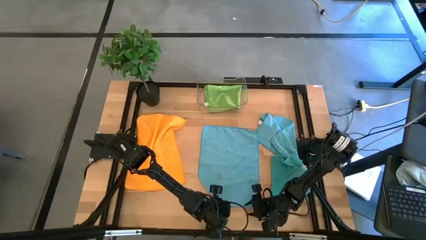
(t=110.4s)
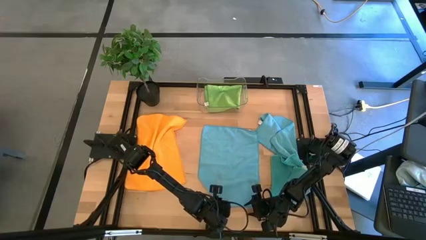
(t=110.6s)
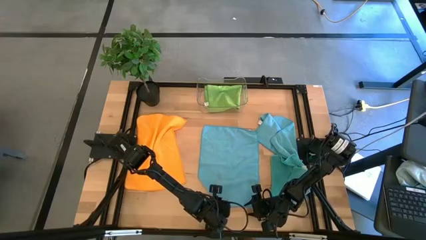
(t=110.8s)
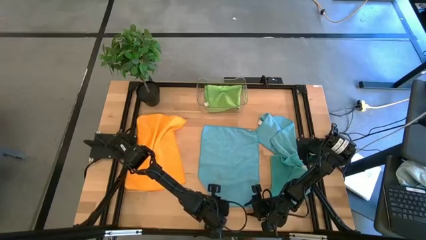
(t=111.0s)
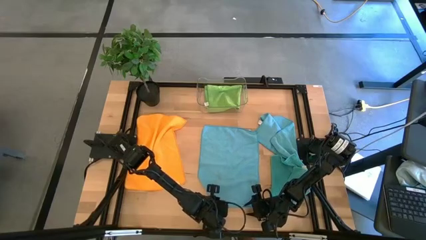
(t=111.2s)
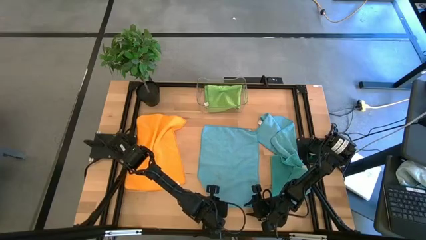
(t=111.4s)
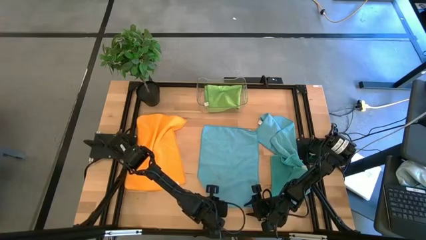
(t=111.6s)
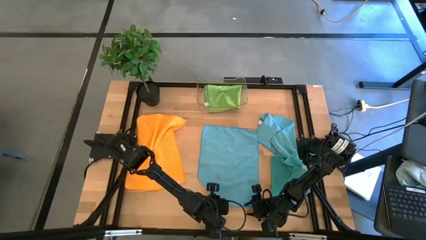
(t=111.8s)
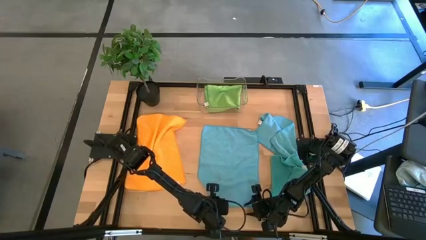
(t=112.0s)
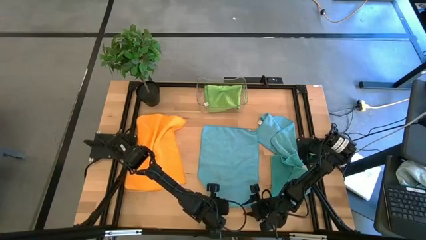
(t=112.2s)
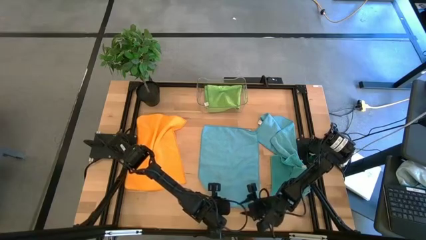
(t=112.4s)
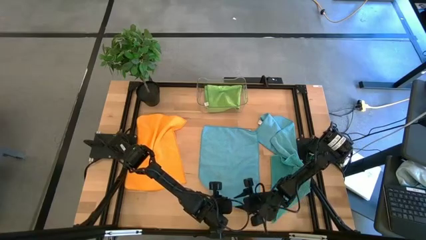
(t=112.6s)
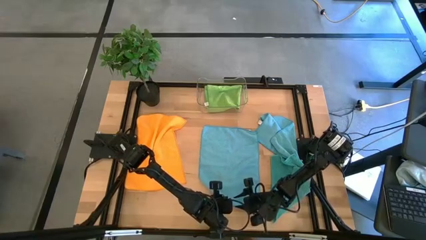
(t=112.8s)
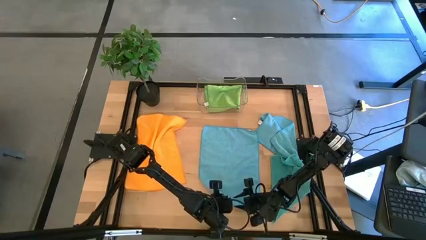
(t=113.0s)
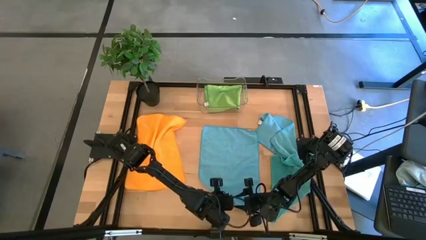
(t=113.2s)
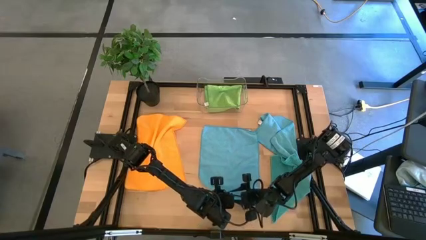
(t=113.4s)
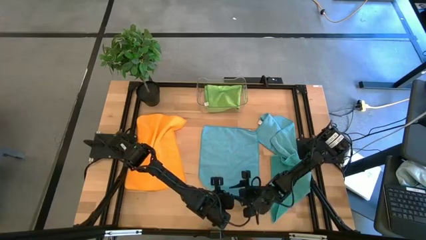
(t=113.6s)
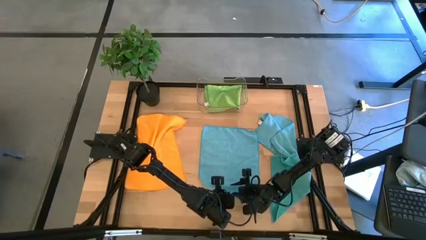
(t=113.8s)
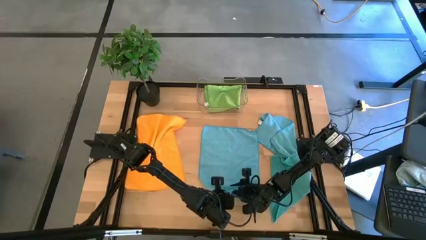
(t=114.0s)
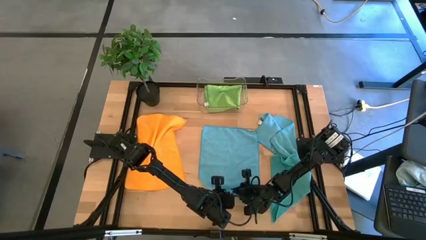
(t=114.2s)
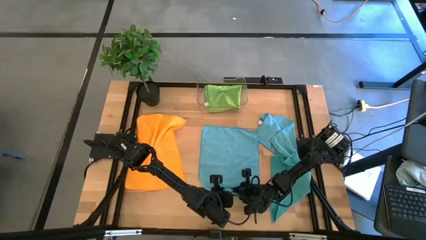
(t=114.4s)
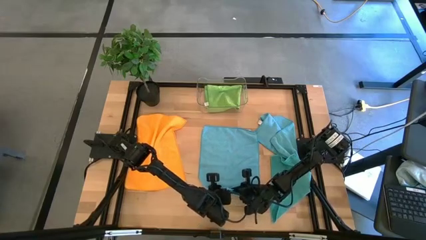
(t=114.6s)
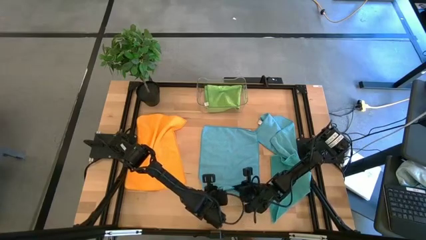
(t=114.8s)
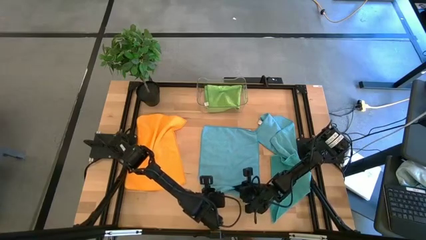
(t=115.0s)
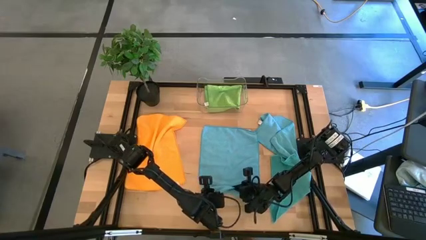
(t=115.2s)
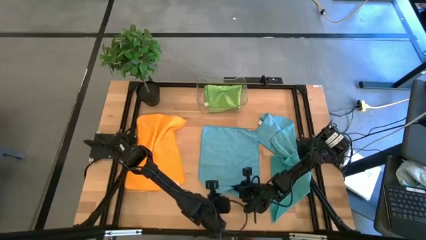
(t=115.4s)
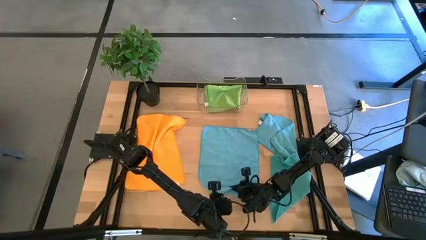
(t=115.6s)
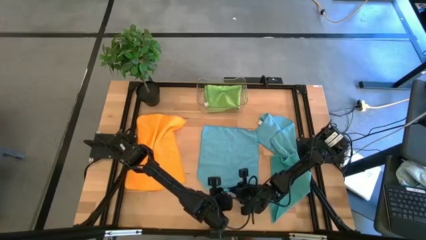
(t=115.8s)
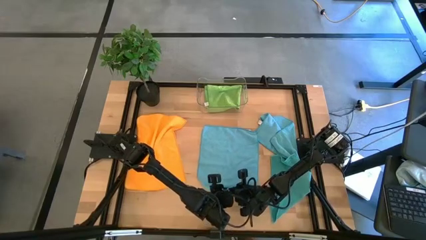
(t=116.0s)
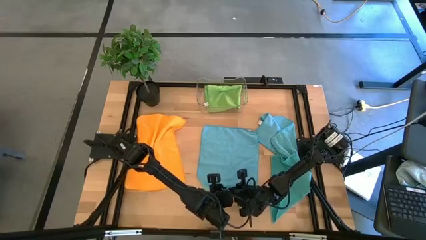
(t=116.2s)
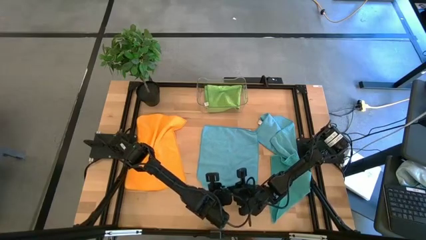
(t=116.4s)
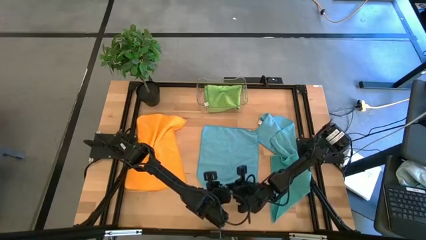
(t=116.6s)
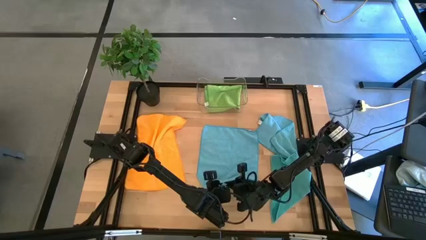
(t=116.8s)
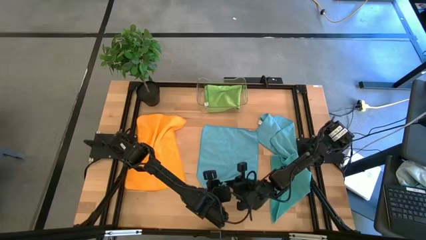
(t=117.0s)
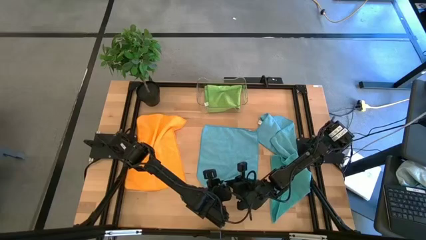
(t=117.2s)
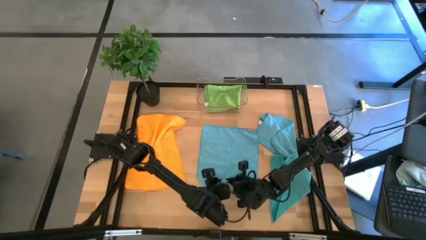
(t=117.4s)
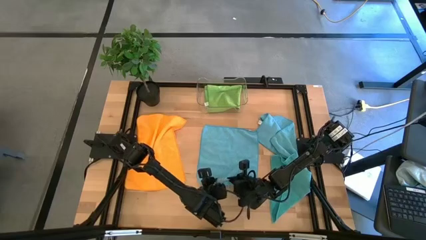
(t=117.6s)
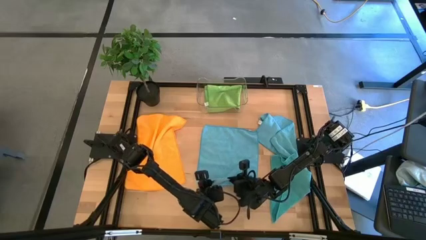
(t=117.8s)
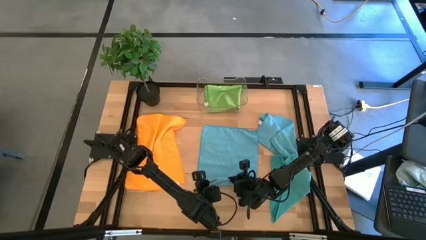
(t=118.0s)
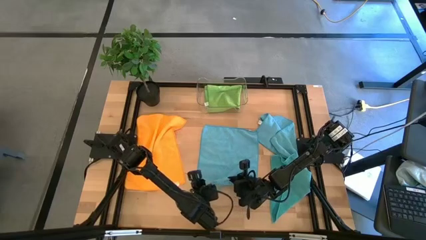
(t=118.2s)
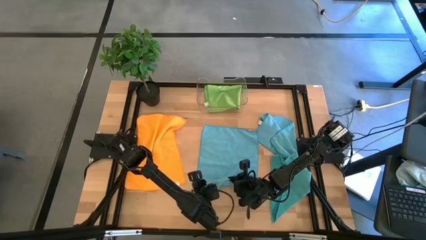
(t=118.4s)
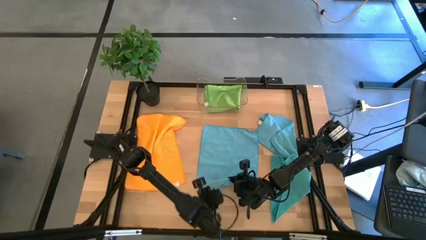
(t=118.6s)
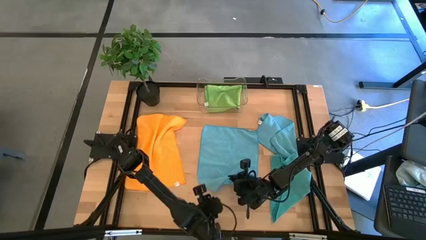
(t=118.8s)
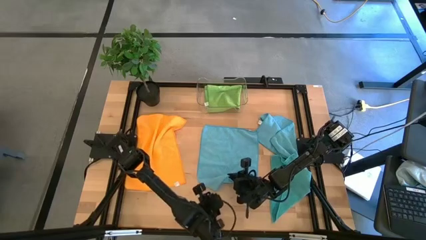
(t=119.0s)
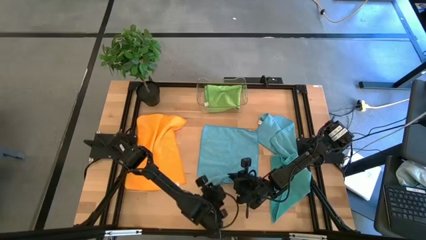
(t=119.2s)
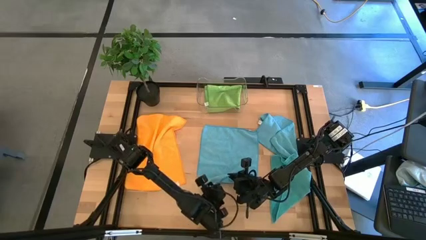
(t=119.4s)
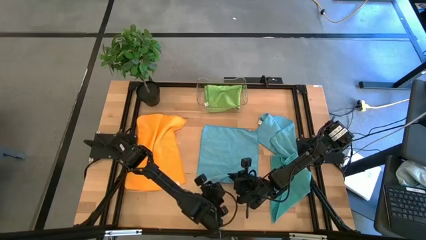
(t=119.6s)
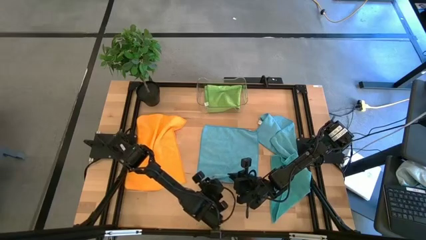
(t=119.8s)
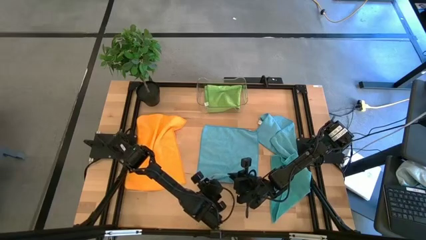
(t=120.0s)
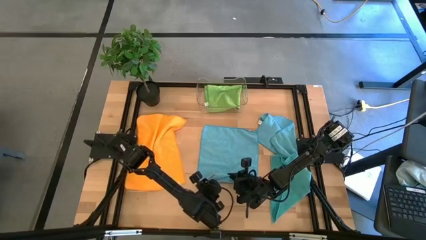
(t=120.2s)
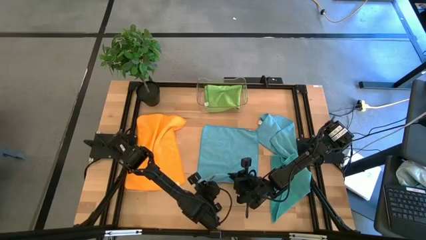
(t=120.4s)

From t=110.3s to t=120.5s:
Task: Fold microfiber towels
Fold the top left blue microfiber towel

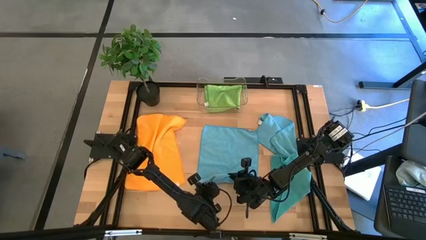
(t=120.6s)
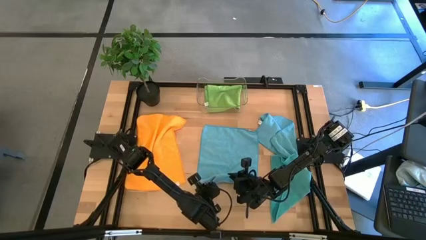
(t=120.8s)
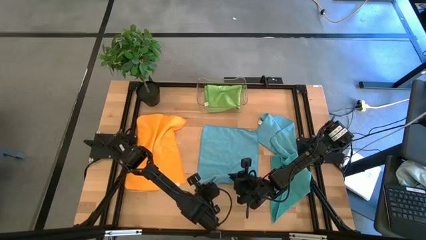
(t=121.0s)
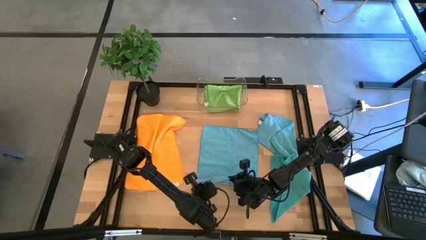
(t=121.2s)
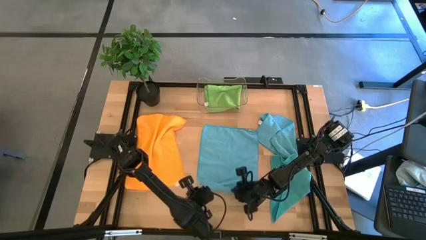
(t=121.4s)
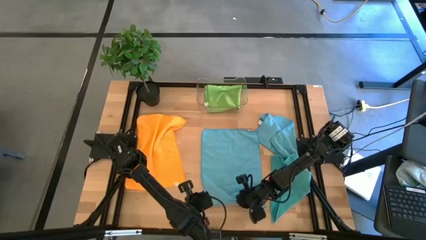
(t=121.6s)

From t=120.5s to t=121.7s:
Fold the top left blue microfiber towel
